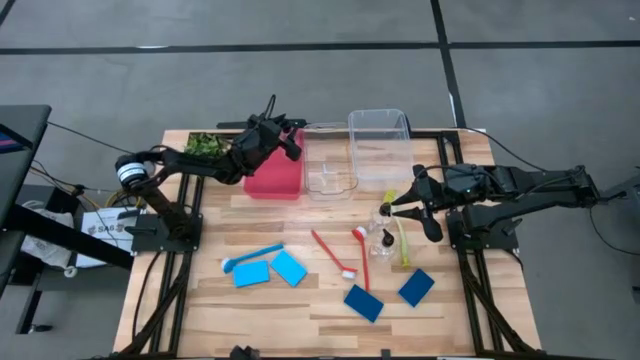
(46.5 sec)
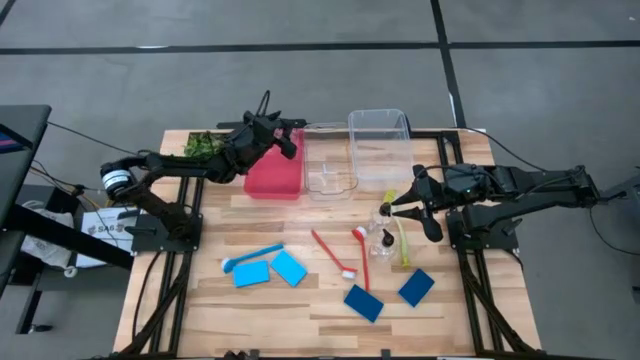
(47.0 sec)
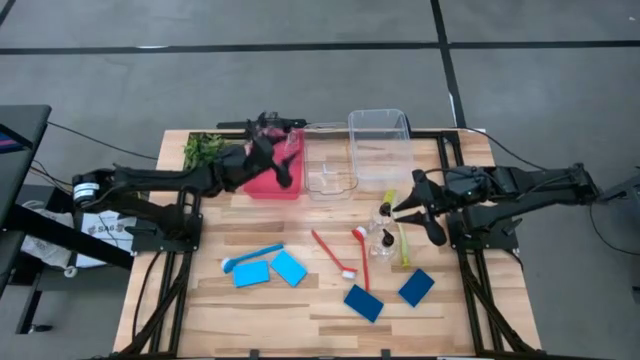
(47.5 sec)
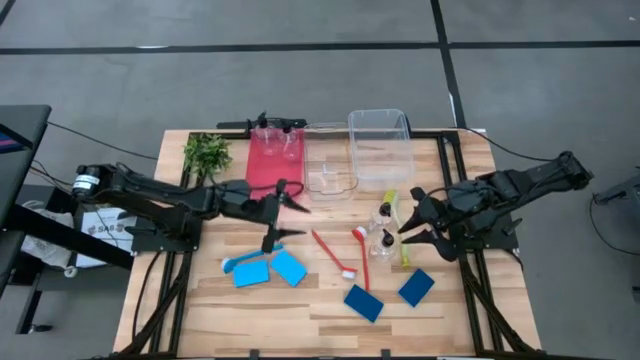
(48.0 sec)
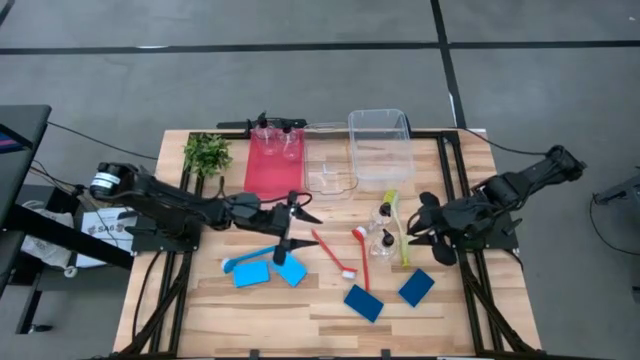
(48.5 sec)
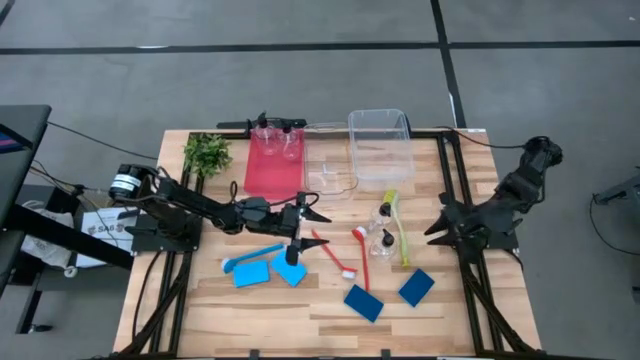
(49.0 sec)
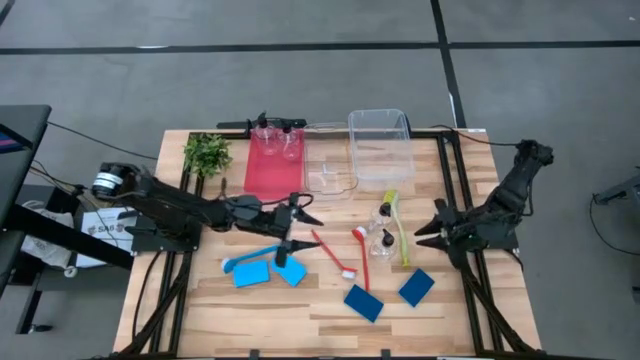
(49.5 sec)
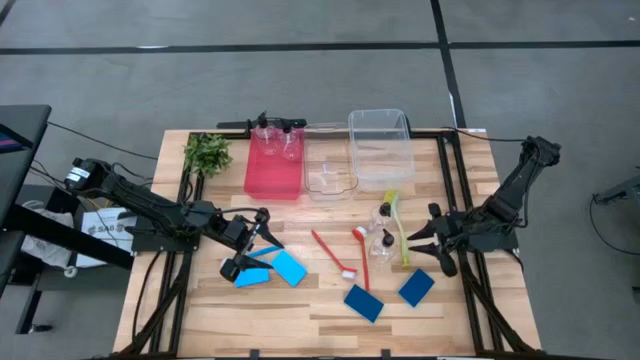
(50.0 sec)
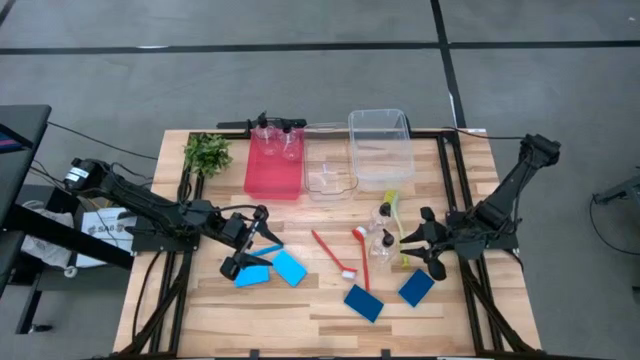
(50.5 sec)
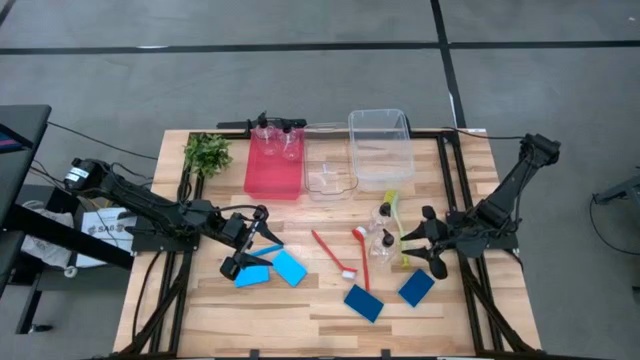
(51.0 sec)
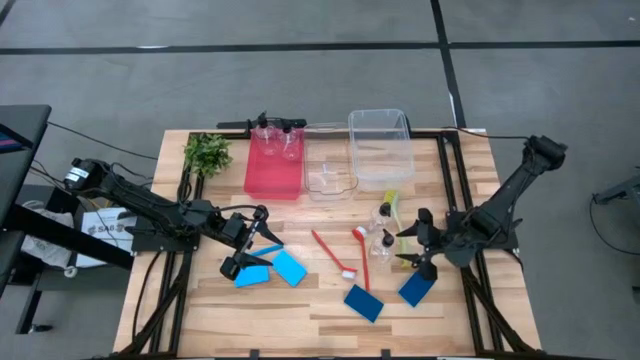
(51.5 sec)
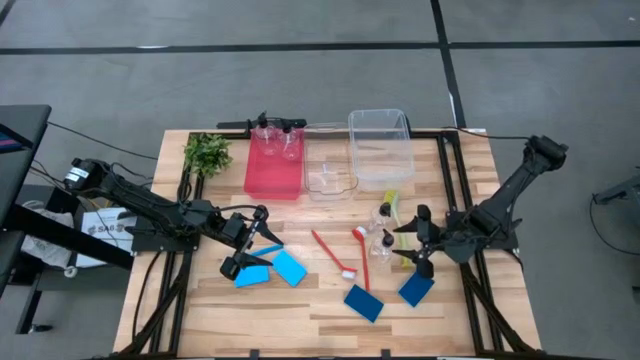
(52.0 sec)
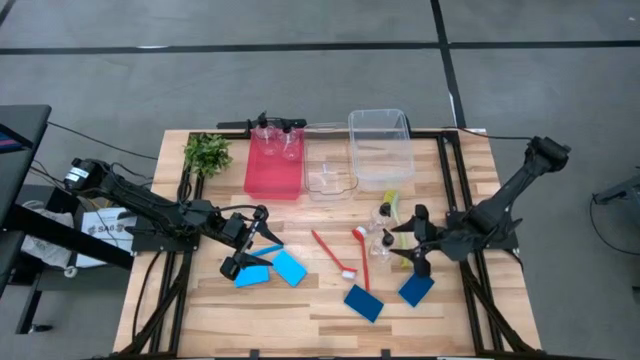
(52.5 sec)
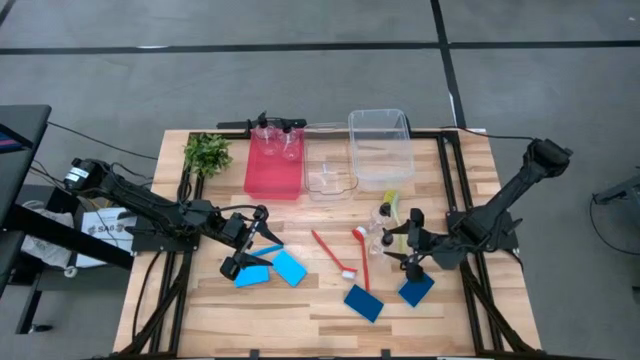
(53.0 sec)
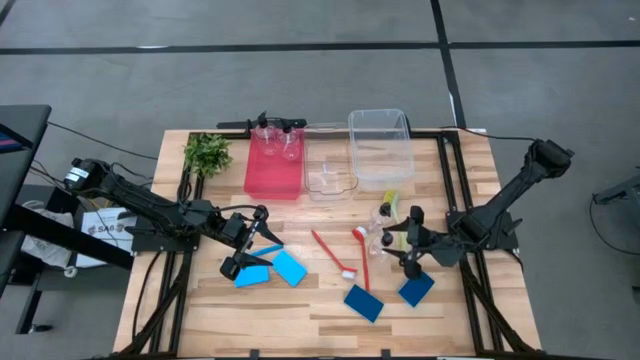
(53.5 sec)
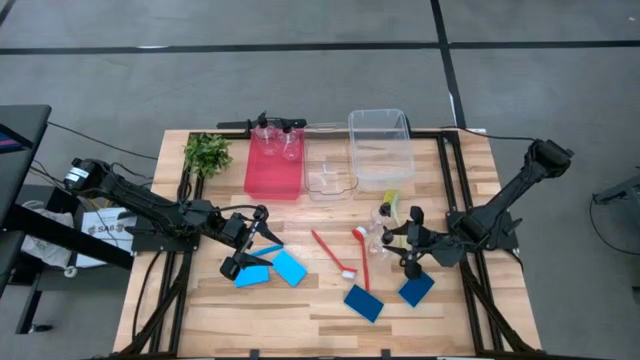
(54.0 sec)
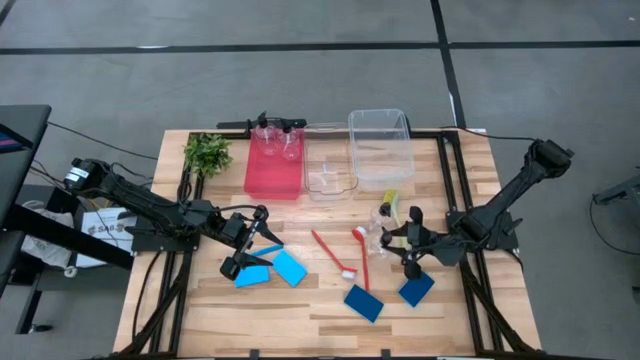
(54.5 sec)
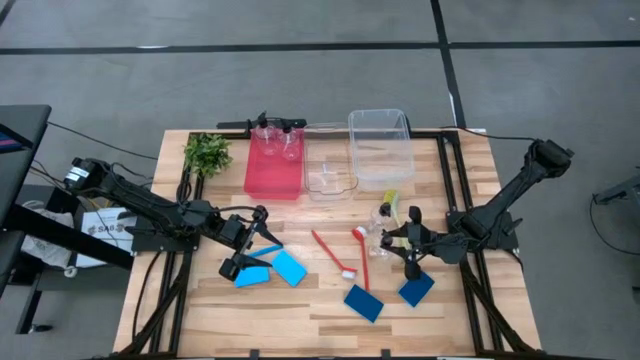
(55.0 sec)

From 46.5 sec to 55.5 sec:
Task: Pick & Place Kitchen Sink Supplies
Put the bottom transparent soap dispenser into the red bin

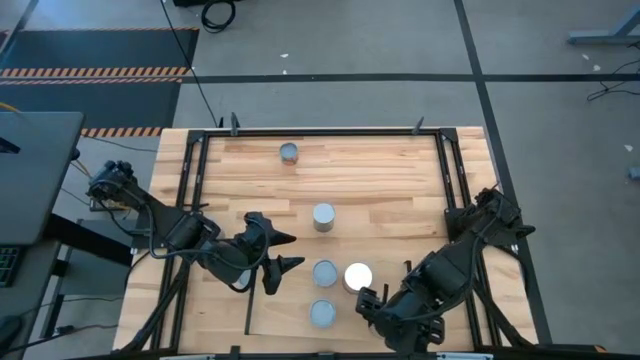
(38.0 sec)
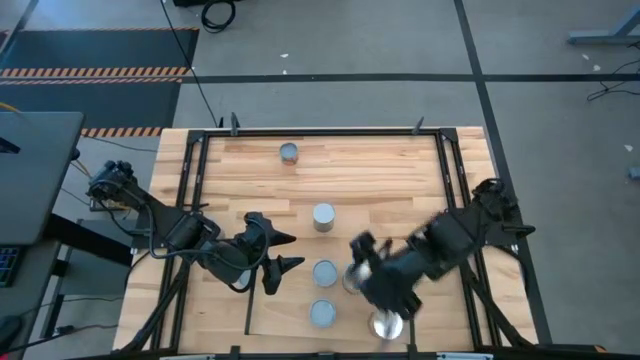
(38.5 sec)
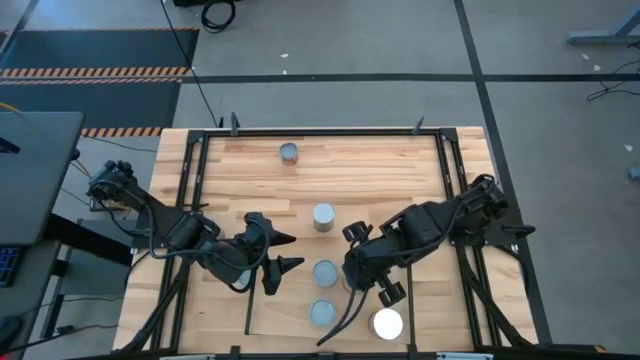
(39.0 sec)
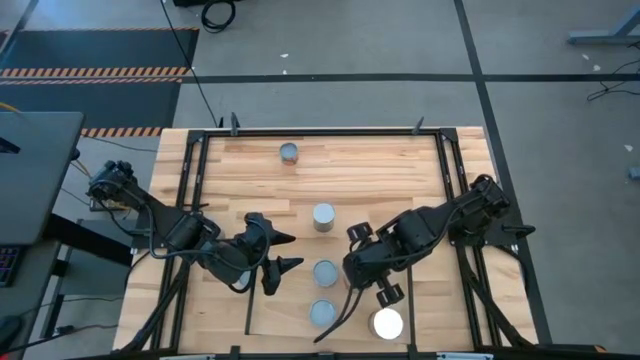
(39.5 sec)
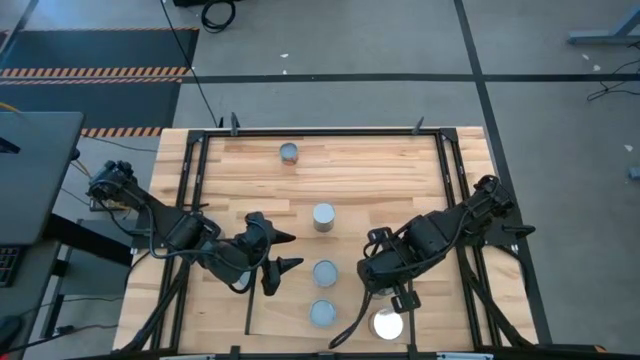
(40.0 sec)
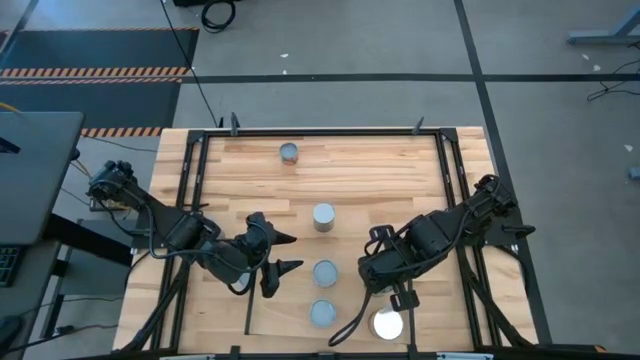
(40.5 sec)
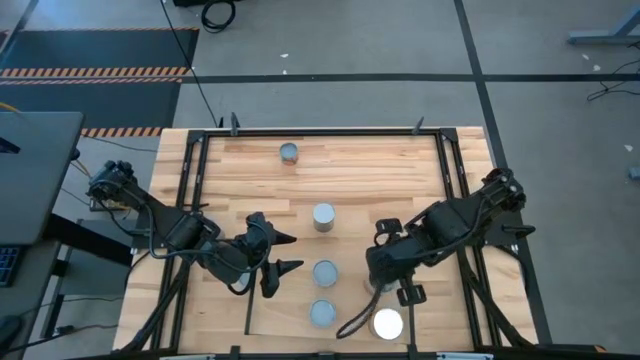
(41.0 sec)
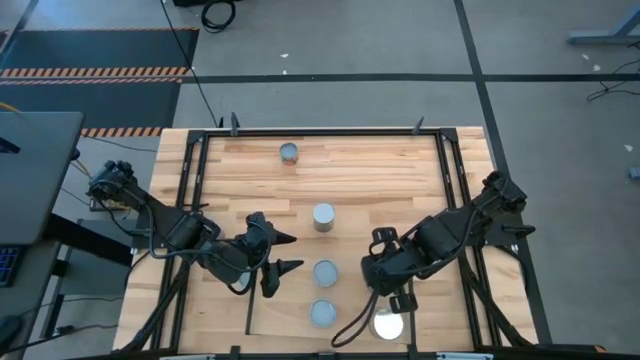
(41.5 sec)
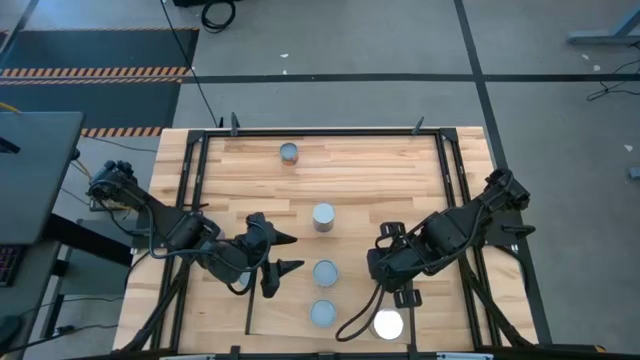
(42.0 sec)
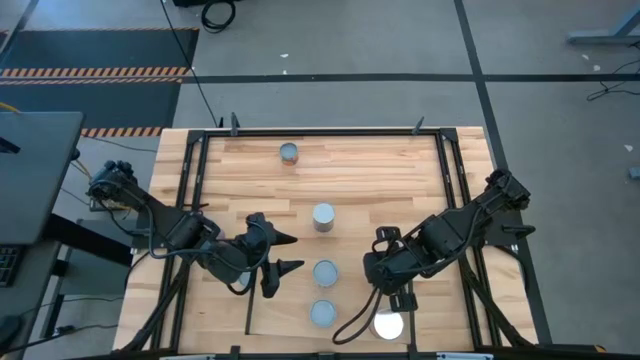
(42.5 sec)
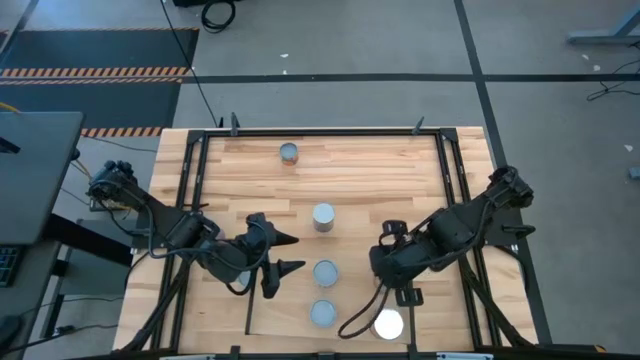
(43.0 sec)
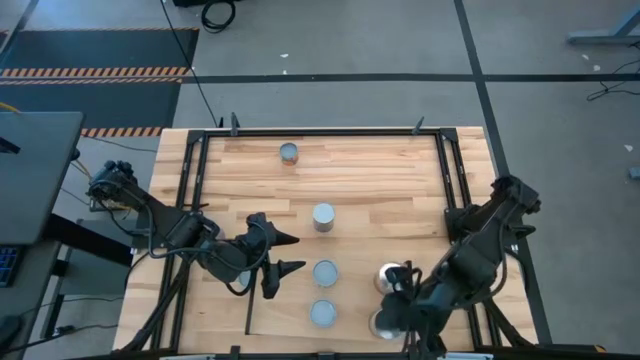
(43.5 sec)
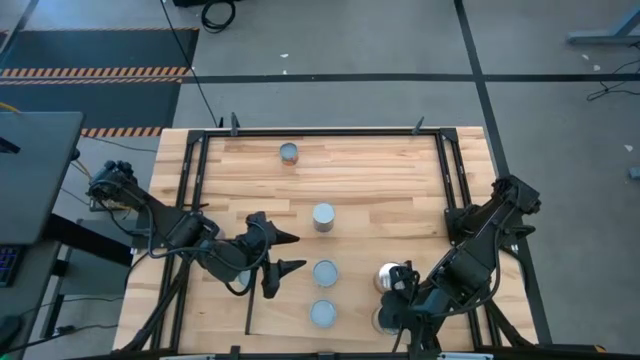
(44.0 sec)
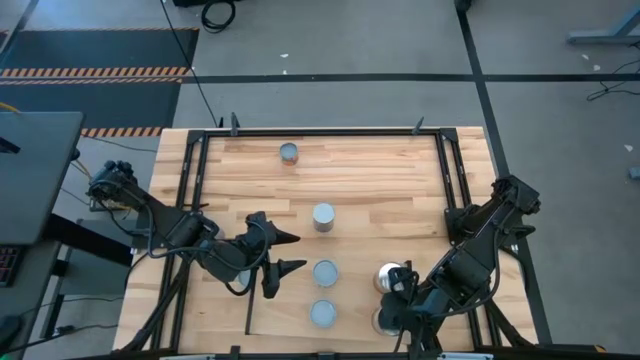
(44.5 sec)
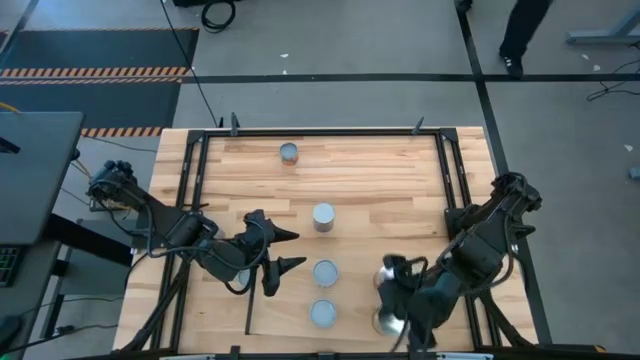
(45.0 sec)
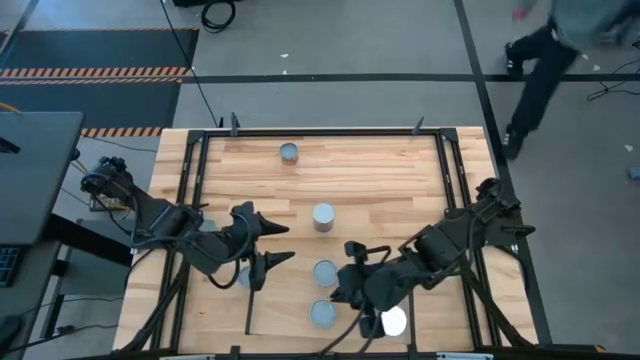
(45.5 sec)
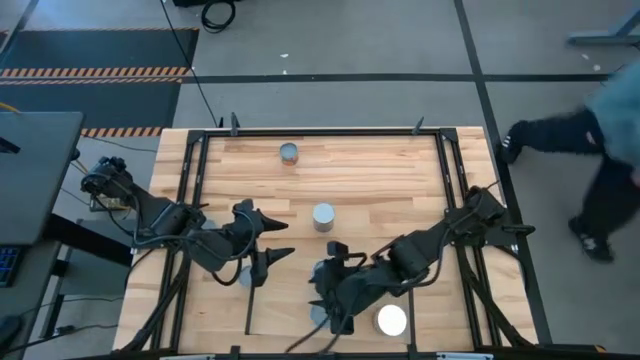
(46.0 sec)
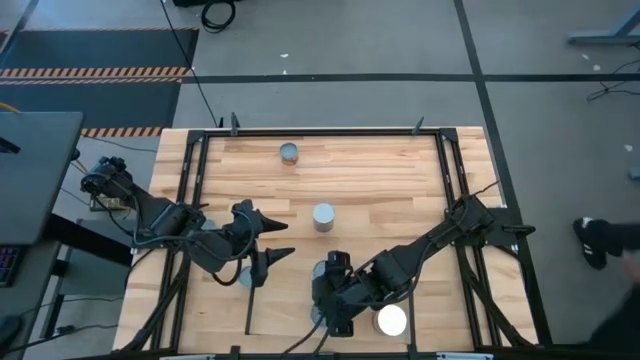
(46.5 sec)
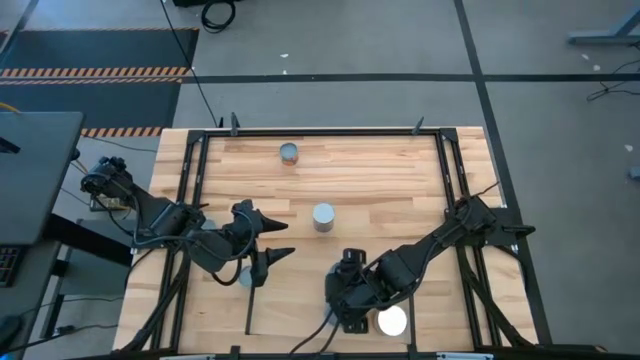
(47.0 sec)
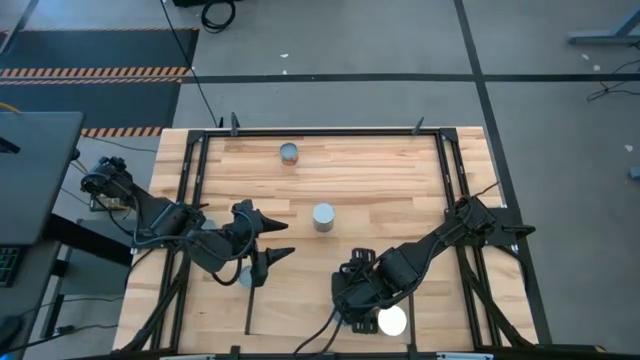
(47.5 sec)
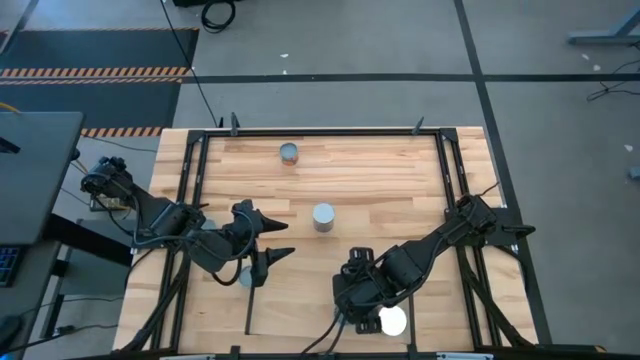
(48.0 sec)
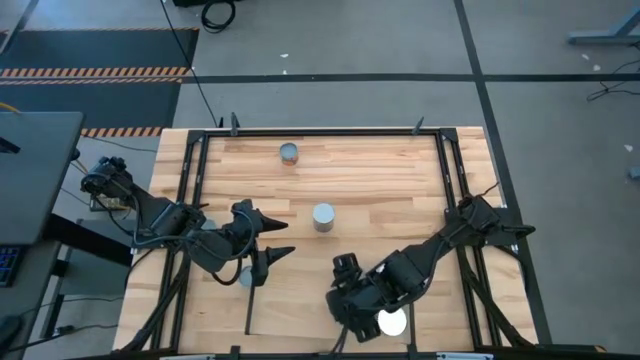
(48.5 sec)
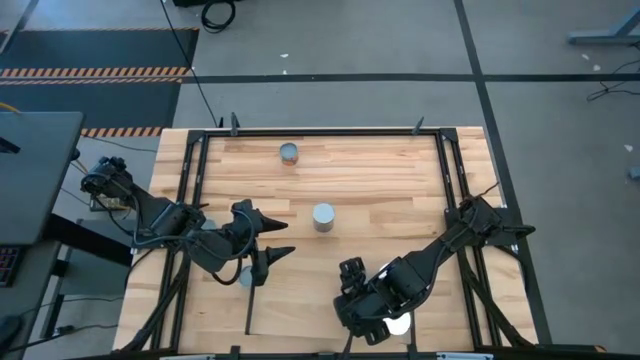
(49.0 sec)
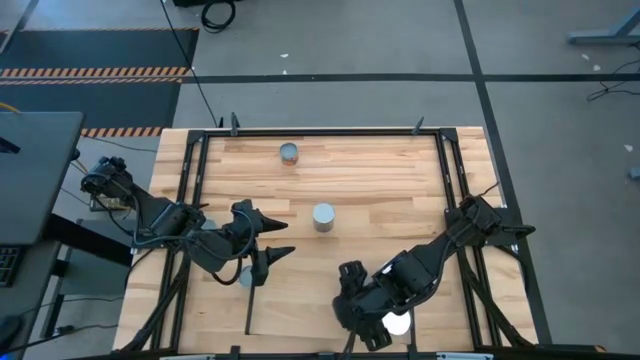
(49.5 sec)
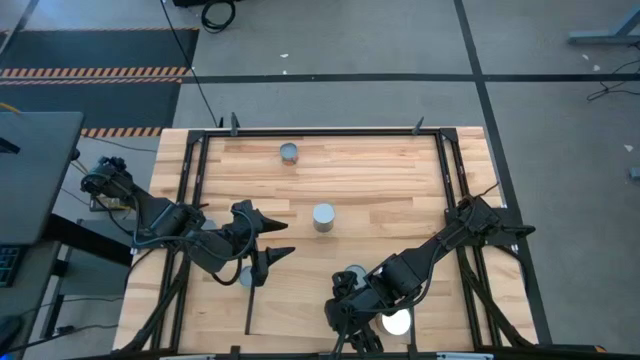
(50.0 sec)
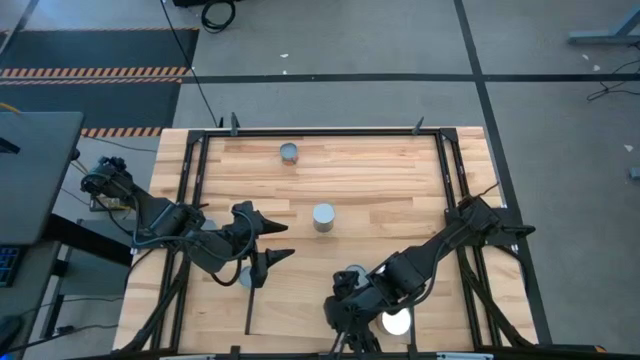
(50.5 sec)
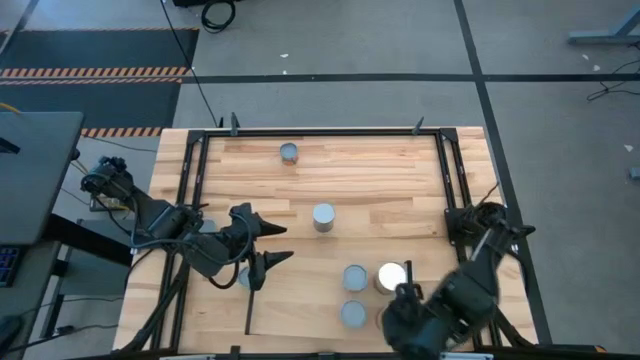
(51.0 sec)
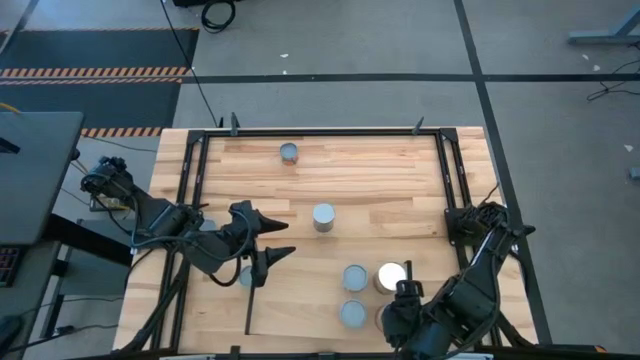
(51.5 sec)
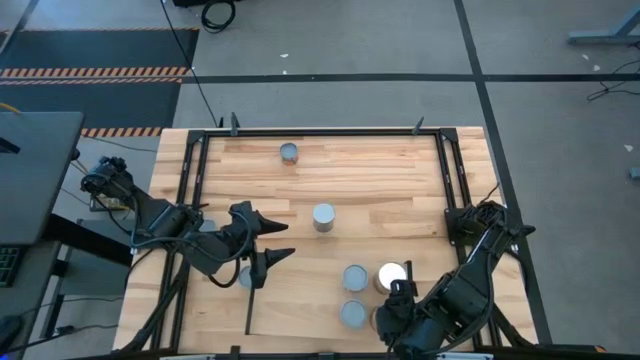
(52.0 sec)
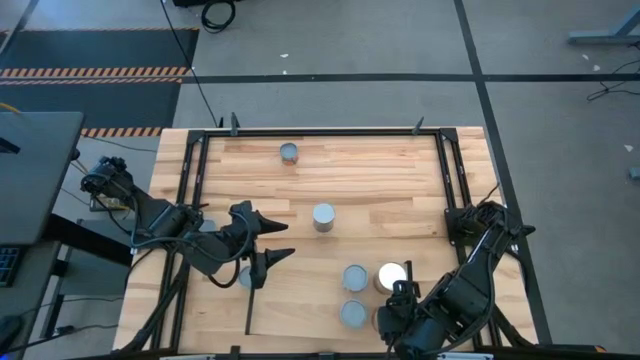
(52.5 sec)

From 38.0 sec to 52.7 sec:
Task: Pick and place cans onto a shelf
Adjust the cans on the shelf
